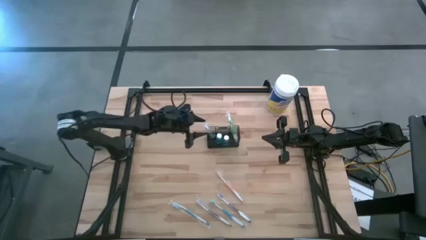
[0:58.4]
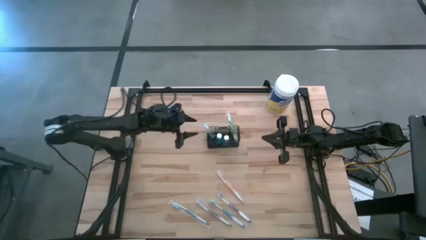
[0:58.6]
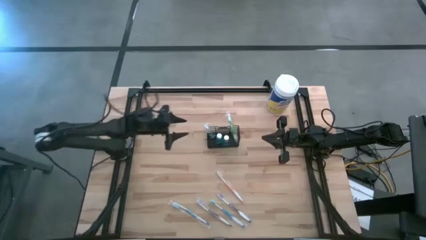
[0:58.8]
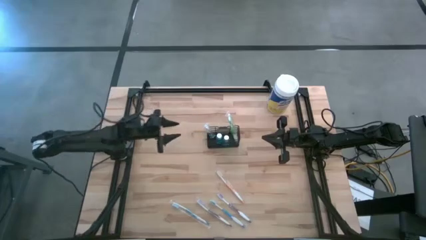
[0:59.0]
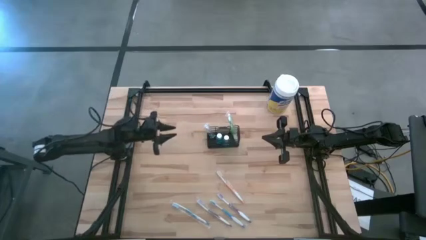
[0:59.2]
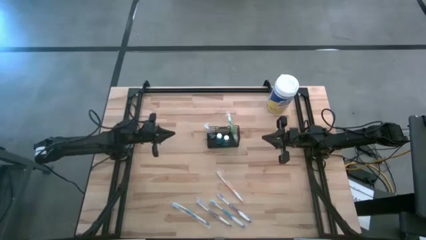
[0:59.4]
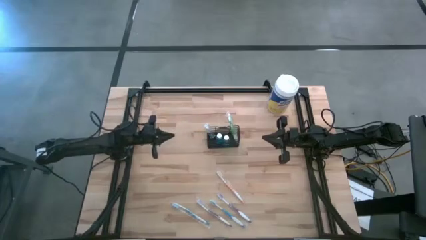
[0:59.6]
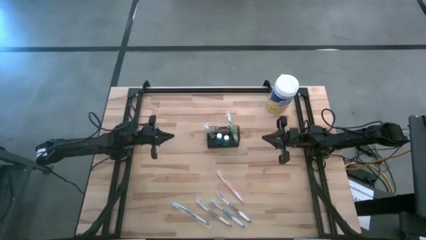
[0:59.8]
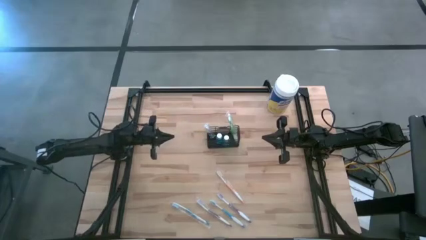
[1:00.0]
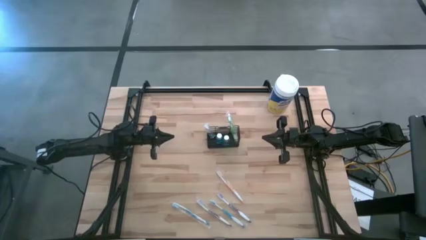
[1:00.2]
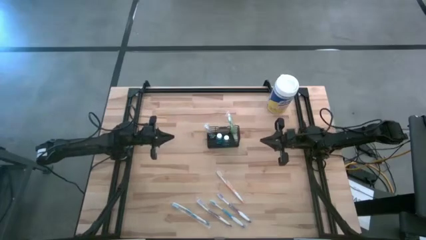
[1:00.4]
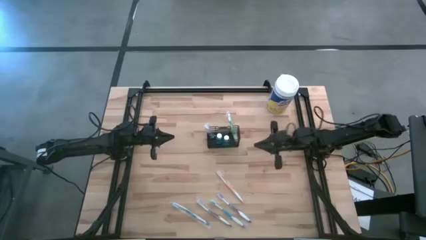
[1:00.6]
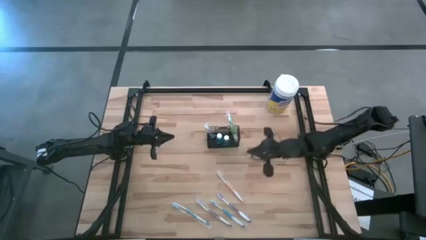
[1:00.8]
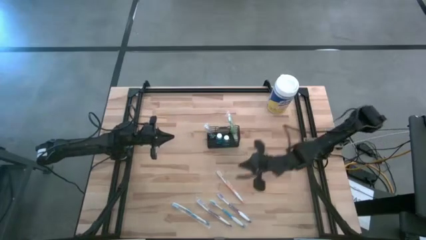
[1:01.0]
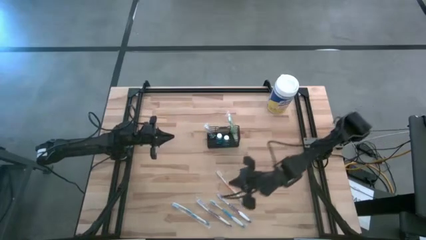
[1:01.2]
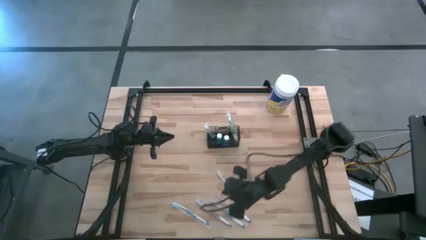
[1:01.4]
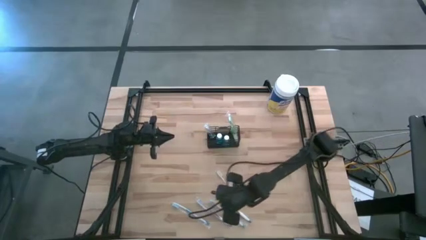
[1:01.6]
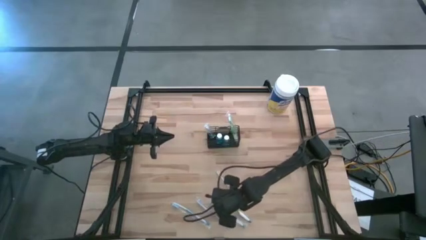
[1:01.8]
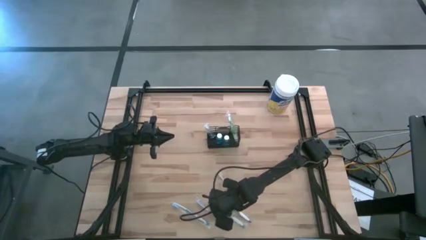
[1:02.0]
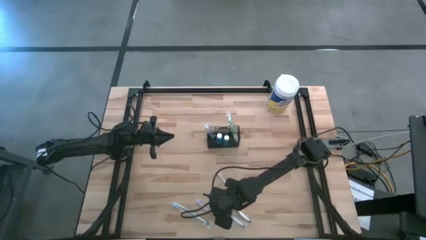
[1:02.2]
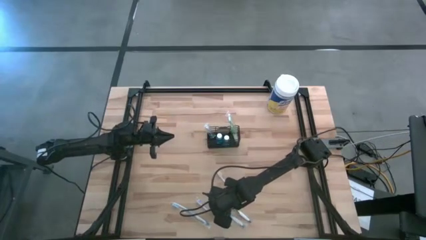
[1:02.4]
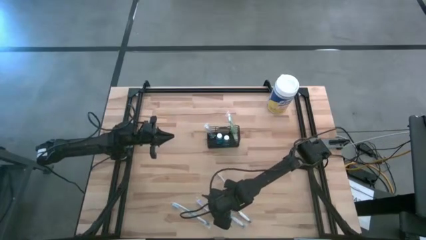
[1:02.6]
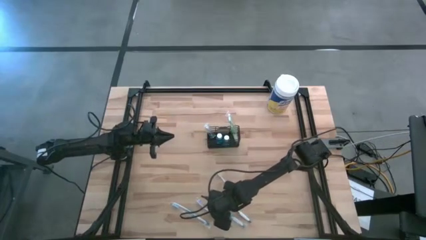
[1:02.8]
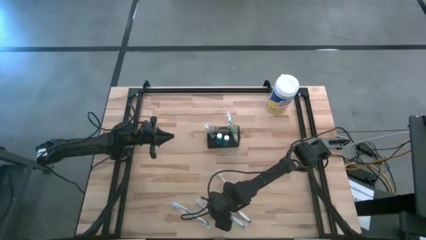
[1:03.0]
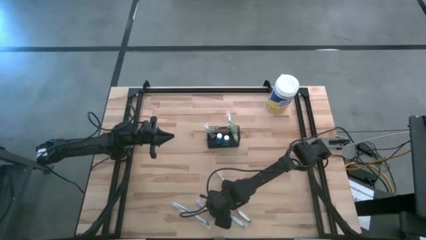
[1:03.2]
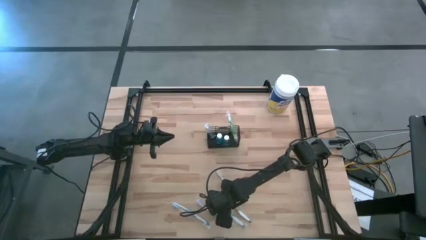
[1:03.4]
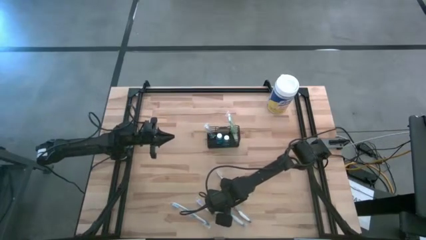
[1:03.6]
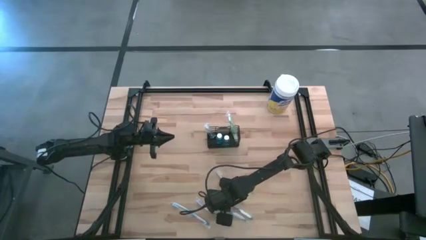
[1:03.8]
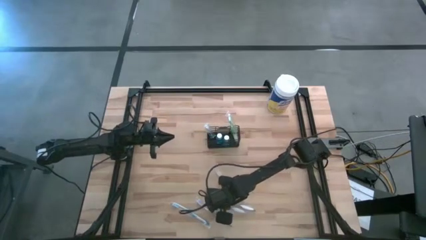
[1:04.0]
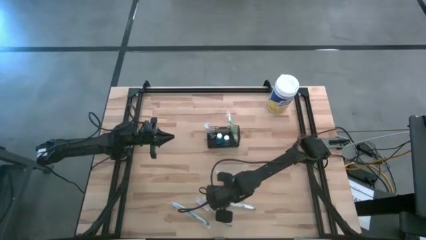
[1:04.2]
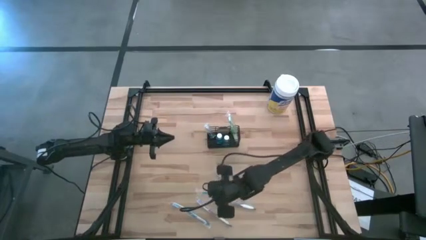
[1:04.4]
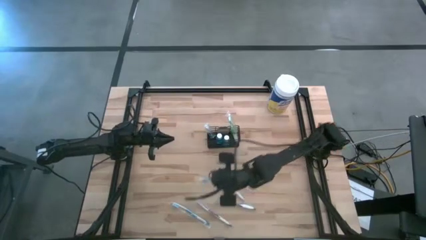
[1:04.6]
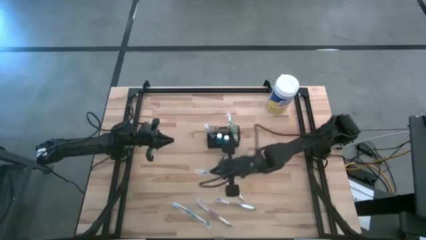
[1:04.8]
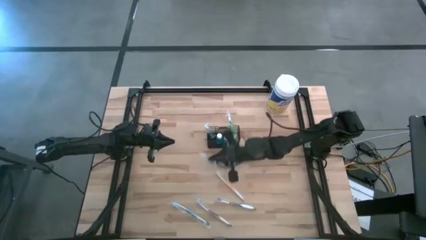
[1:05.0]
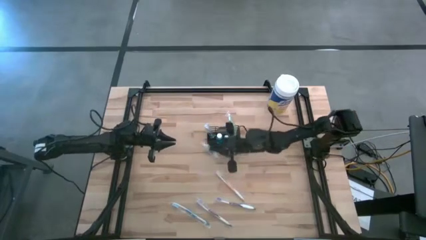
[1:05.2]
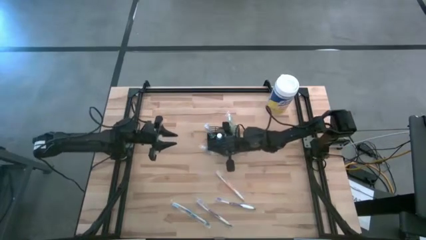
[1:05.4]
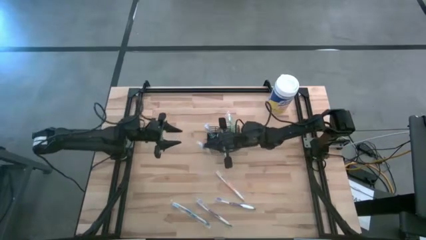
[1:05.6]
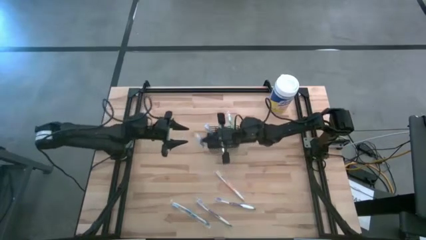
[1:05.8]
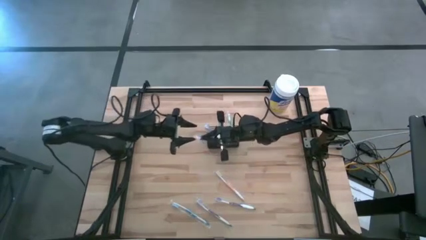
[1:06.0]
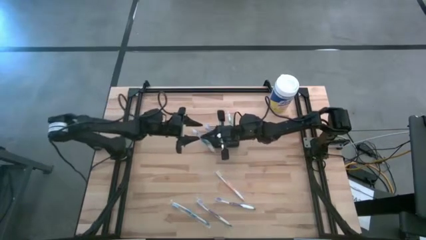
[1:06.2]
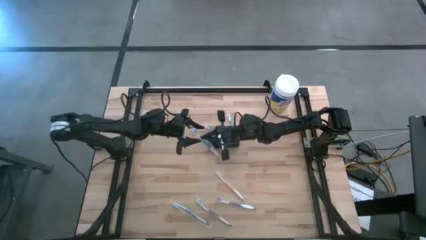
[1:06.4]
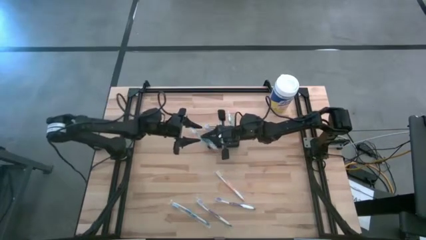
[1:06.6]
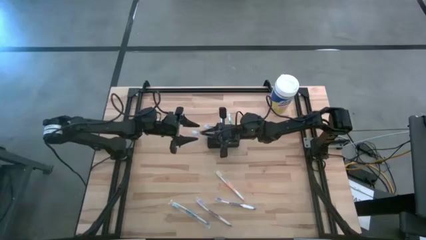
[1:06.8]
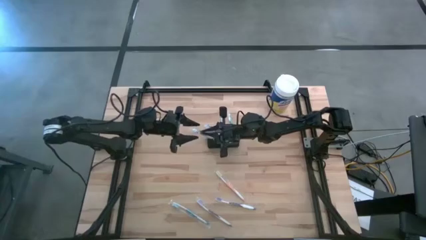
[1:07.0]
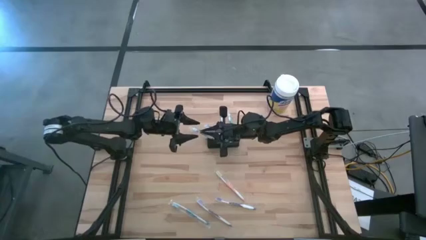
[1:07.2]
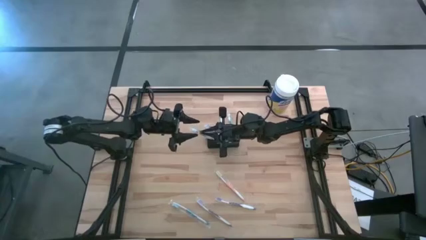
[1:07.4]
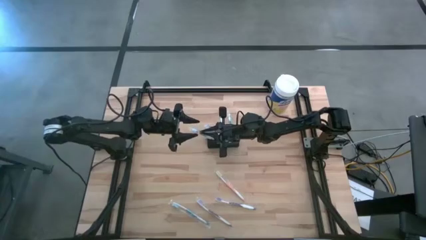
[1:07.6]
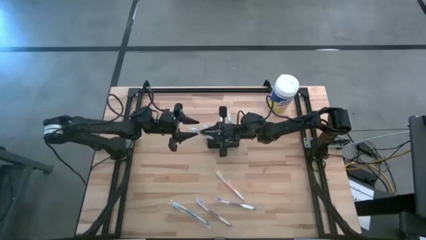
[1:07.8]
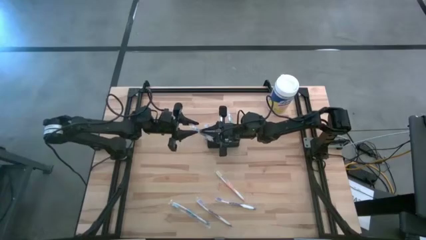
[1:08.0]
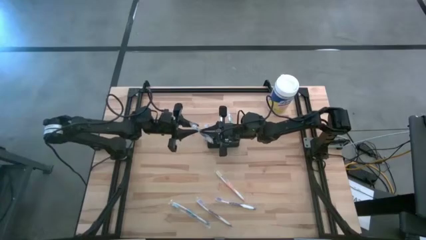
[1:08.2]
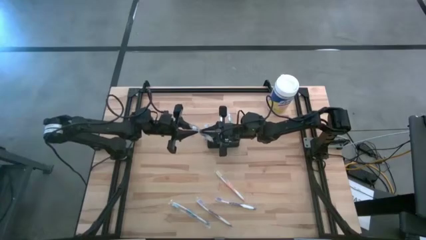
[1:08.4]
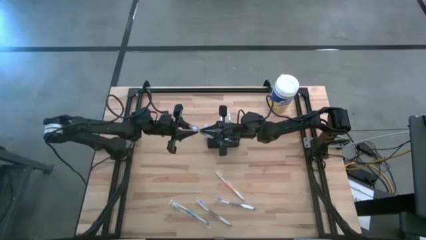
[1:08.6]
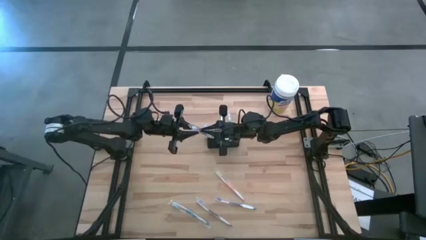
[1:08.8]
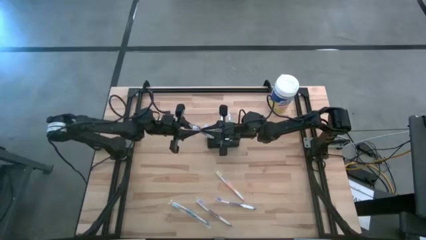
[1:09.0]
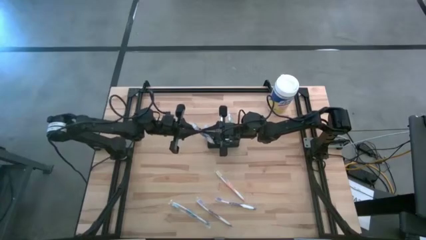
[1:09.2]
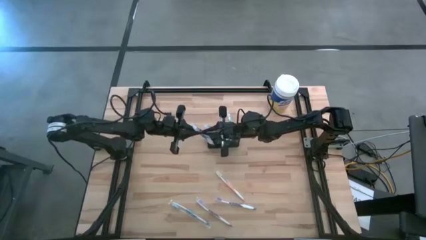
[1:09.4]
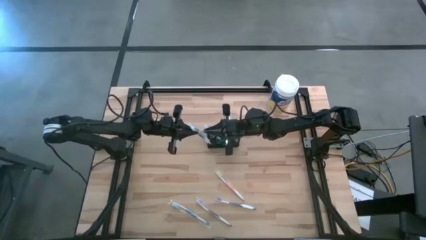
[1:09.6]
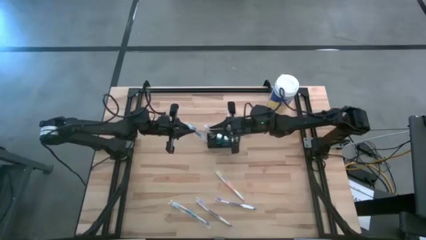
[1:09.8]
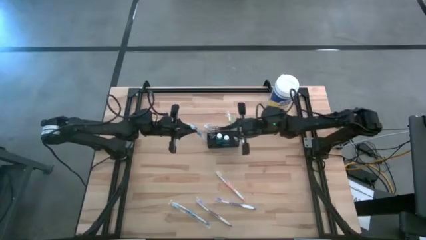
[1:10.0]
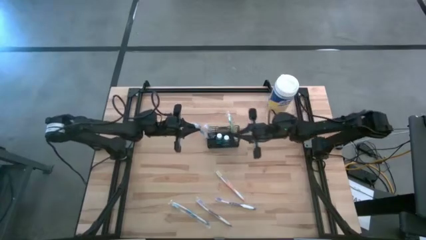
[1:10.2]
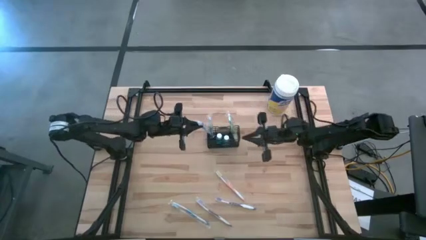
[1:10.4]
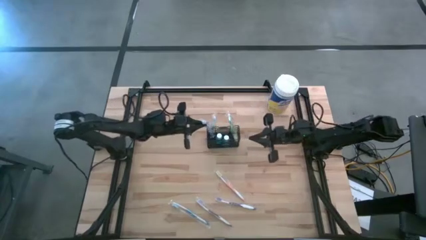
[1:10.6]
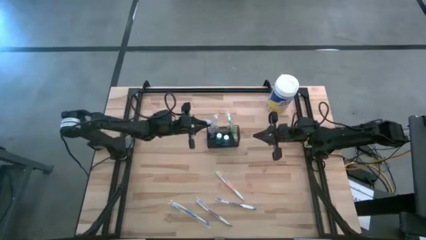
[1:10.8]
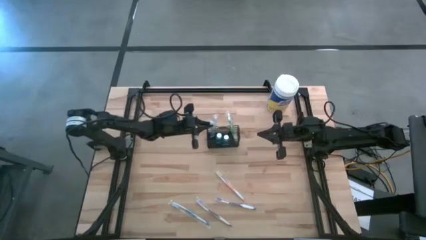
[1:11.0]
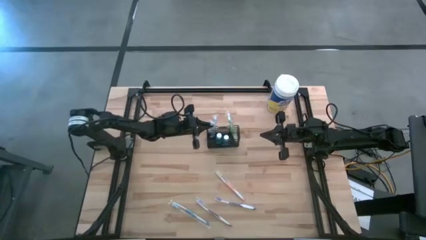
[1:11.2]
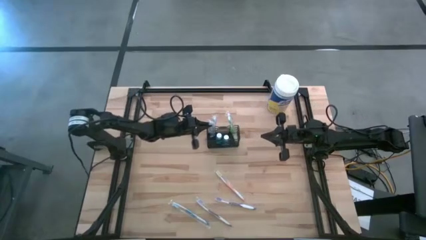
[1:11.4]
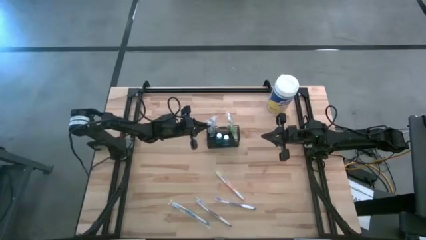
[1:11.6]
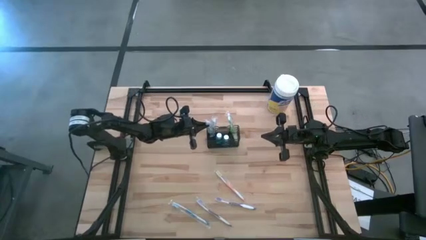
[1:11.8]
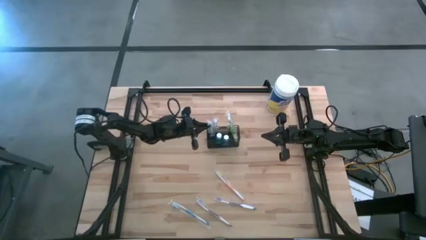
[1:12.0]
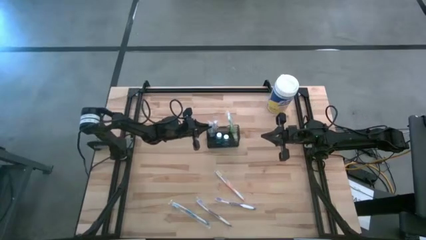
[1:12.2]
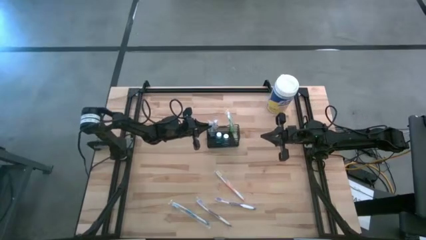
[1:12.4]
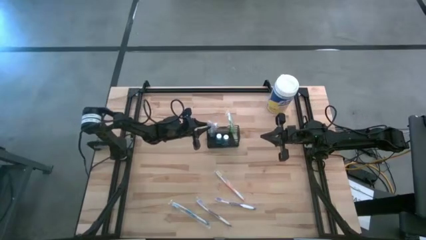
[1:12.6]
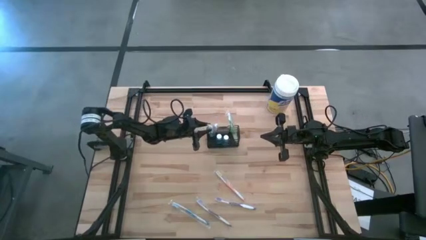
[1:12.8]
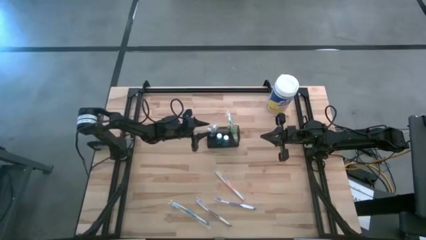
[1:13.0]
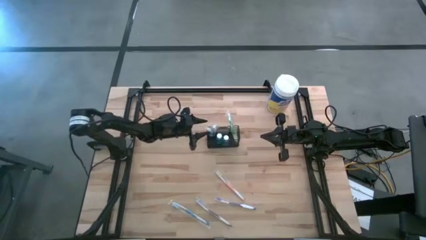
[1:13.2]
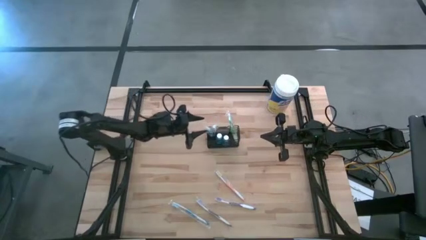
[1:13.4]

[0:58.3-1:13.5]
Task: Pick & Place toothbrushing station
Put the right blue toothbrush into the wire organizer
